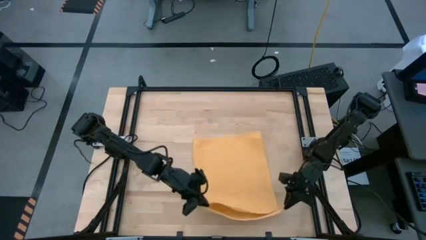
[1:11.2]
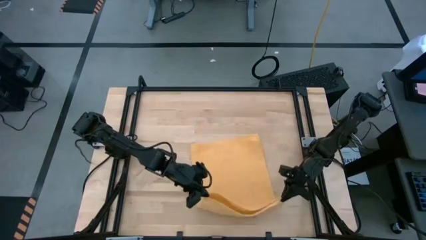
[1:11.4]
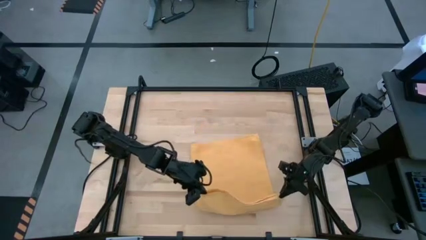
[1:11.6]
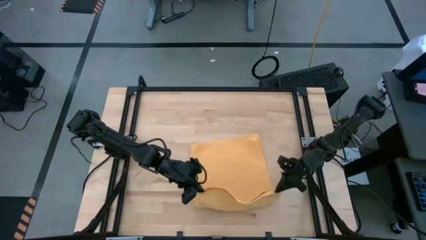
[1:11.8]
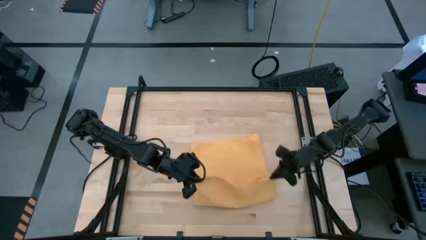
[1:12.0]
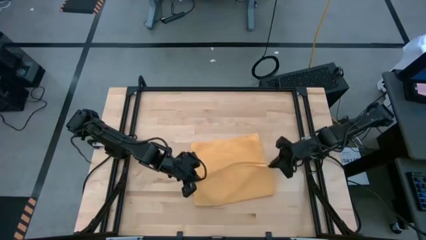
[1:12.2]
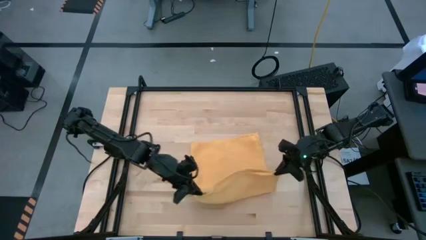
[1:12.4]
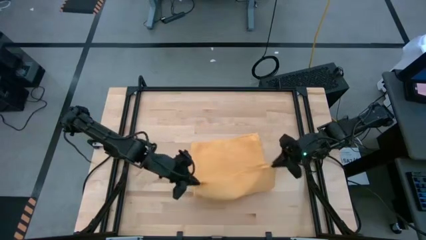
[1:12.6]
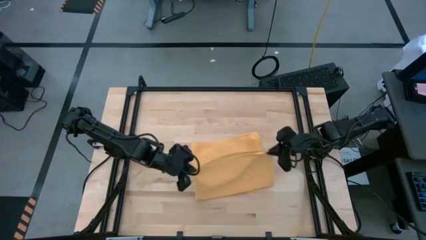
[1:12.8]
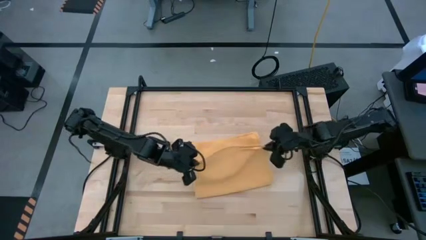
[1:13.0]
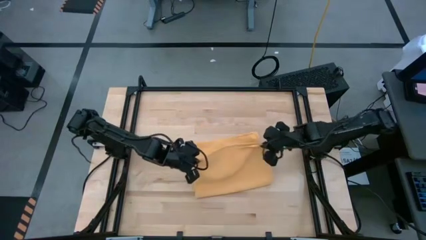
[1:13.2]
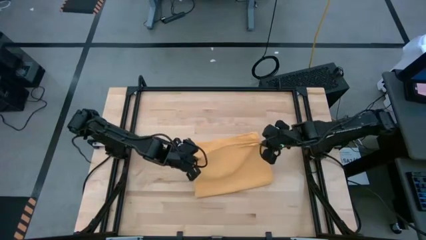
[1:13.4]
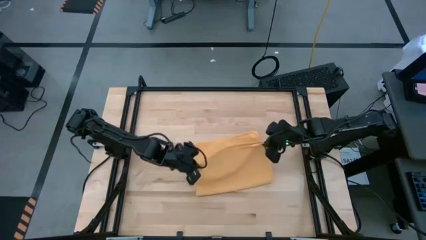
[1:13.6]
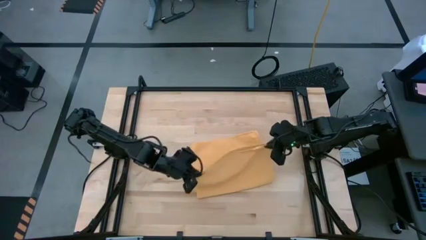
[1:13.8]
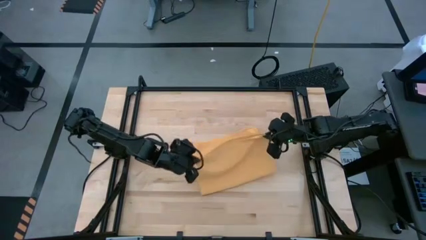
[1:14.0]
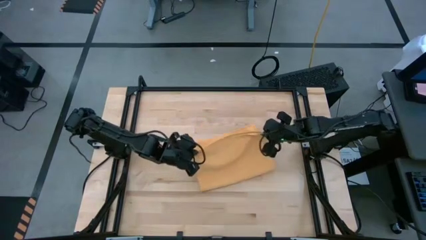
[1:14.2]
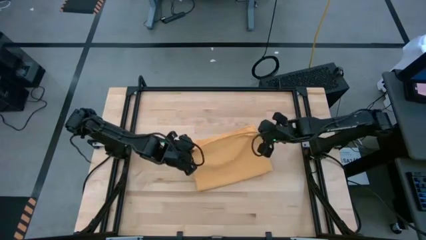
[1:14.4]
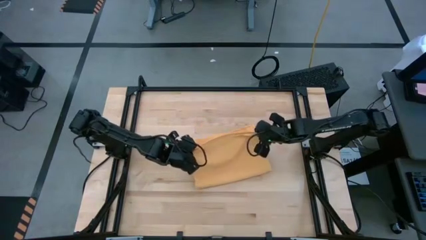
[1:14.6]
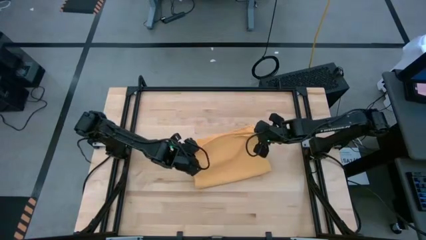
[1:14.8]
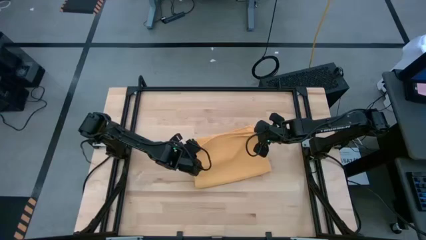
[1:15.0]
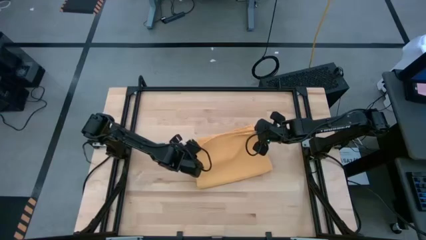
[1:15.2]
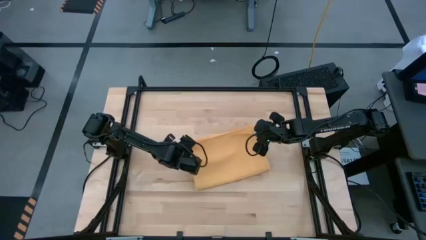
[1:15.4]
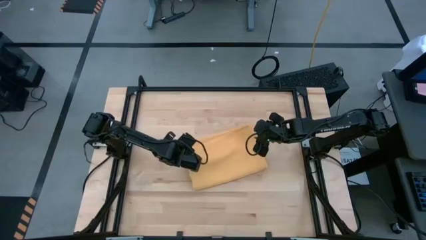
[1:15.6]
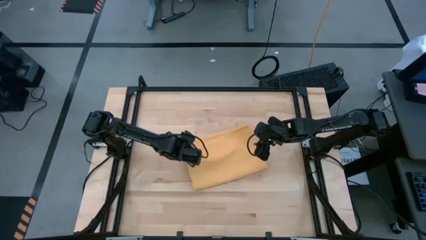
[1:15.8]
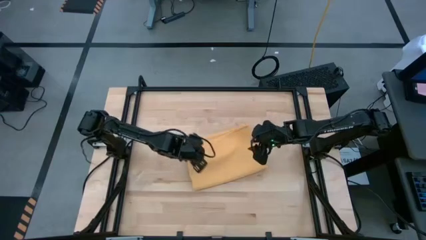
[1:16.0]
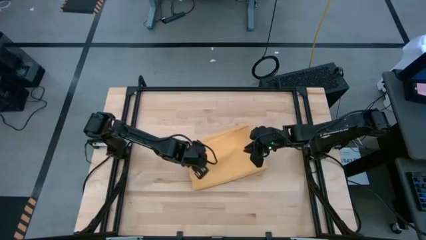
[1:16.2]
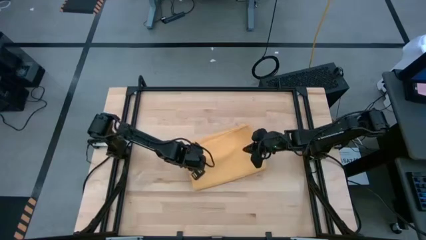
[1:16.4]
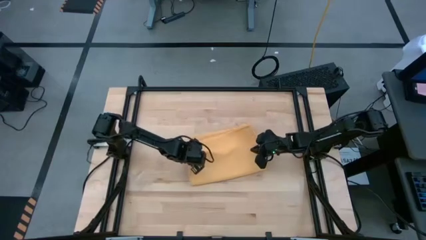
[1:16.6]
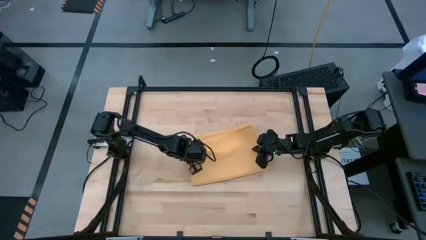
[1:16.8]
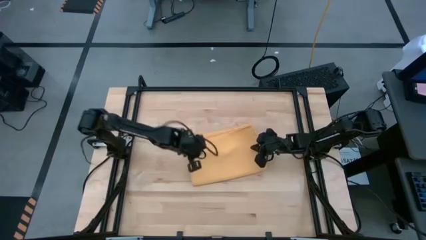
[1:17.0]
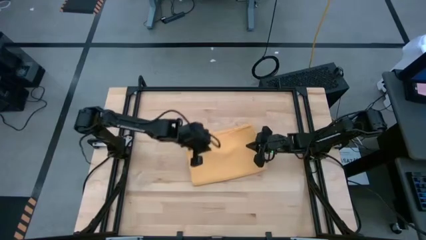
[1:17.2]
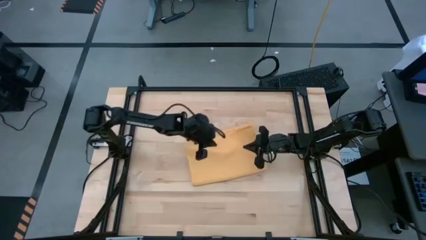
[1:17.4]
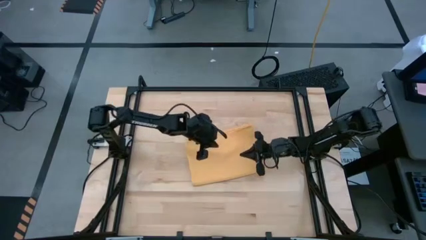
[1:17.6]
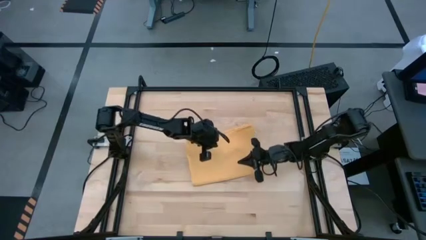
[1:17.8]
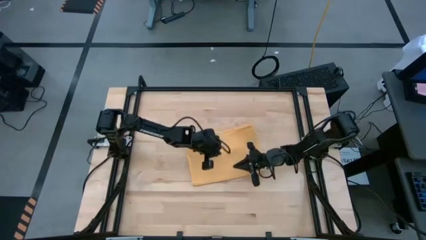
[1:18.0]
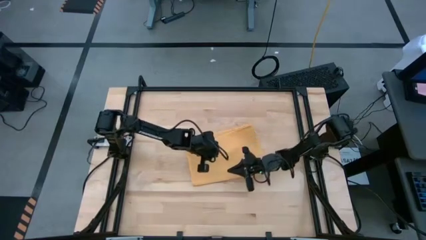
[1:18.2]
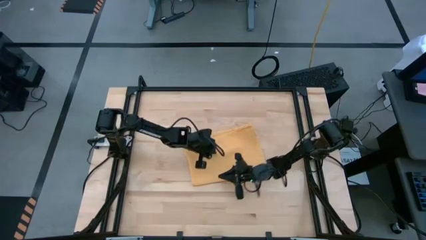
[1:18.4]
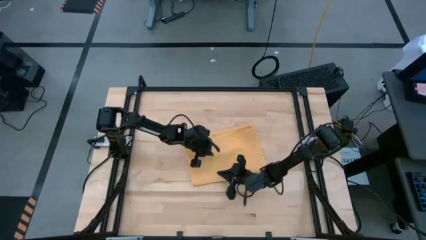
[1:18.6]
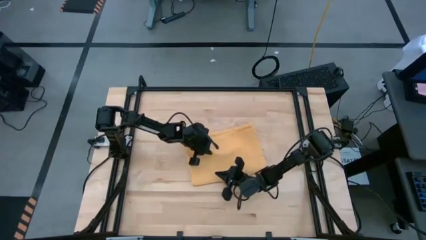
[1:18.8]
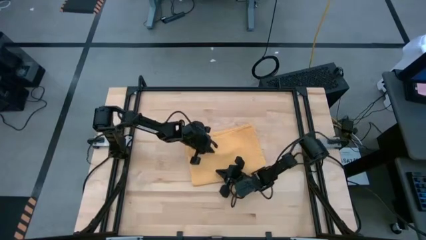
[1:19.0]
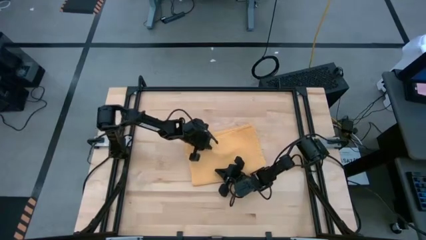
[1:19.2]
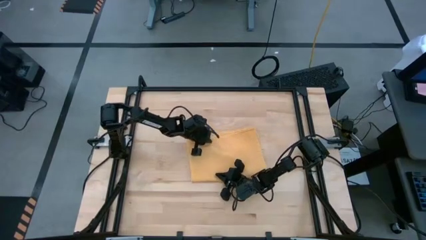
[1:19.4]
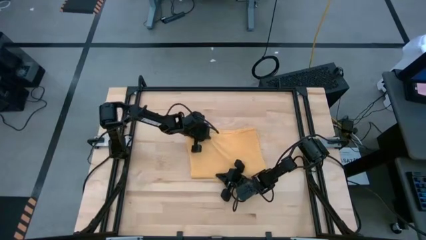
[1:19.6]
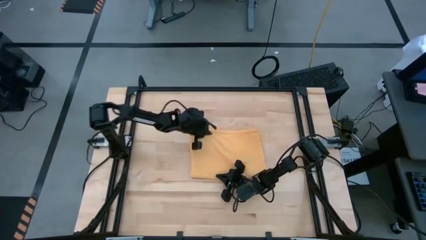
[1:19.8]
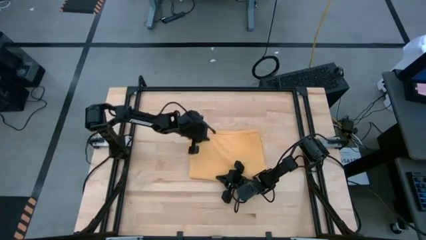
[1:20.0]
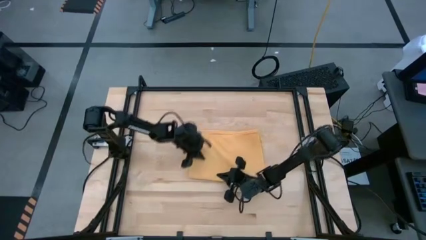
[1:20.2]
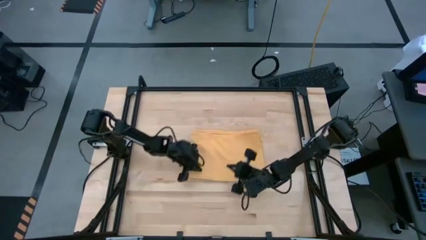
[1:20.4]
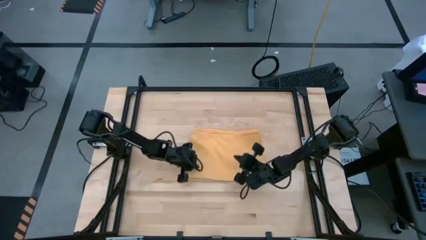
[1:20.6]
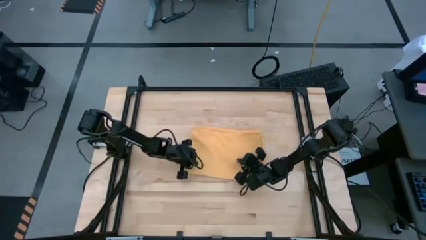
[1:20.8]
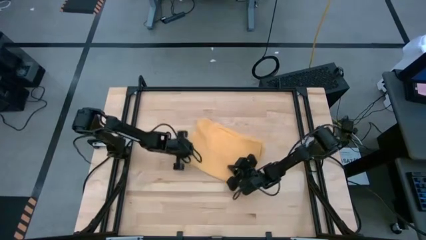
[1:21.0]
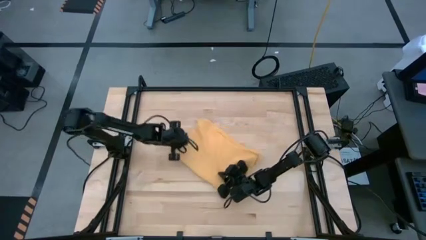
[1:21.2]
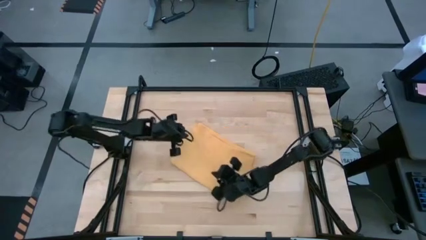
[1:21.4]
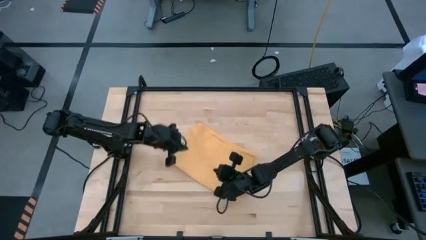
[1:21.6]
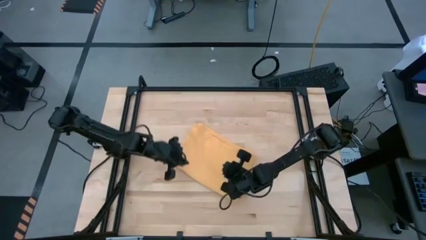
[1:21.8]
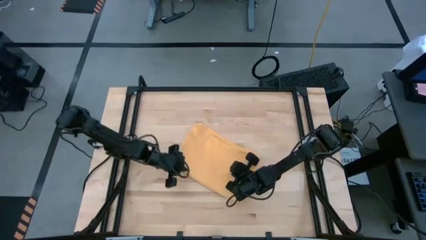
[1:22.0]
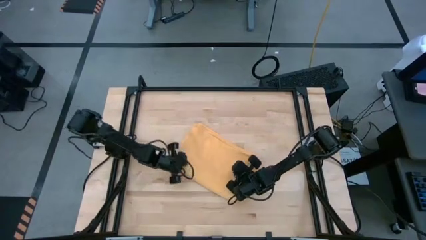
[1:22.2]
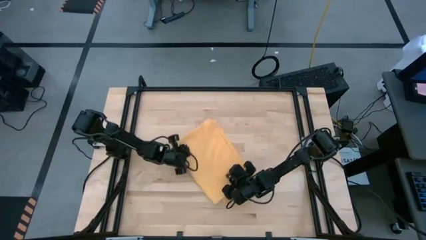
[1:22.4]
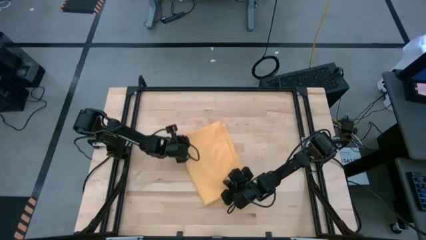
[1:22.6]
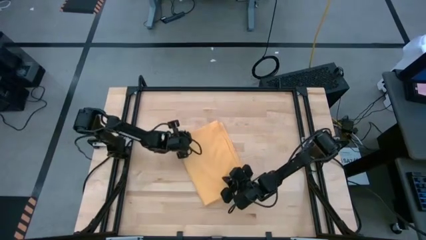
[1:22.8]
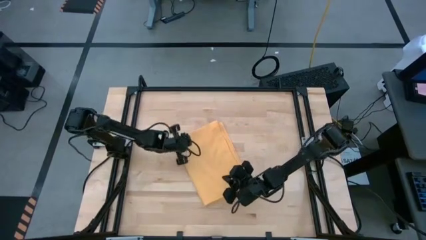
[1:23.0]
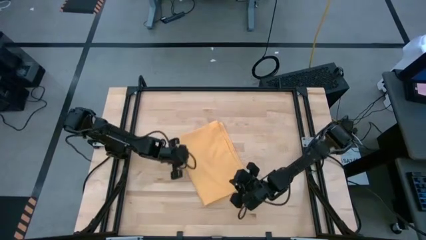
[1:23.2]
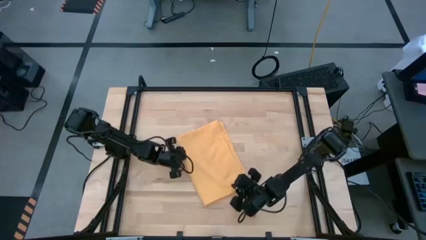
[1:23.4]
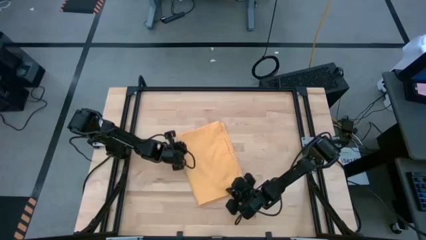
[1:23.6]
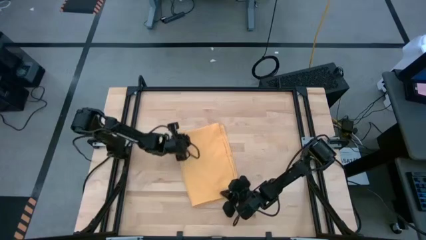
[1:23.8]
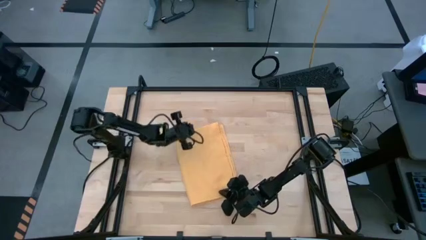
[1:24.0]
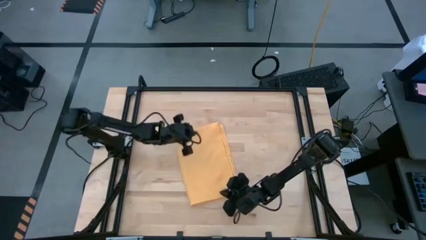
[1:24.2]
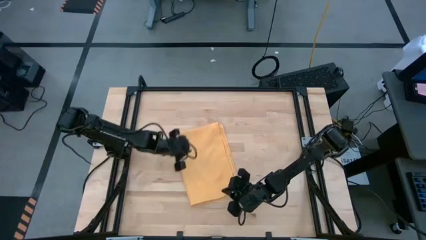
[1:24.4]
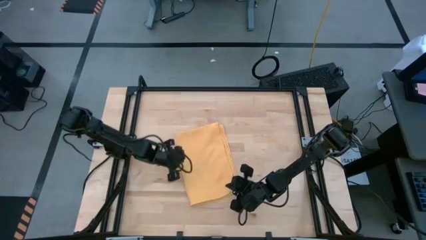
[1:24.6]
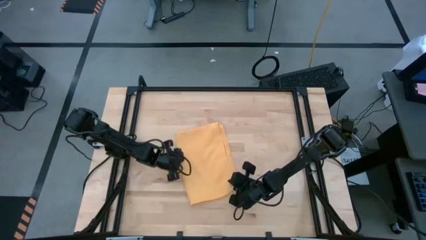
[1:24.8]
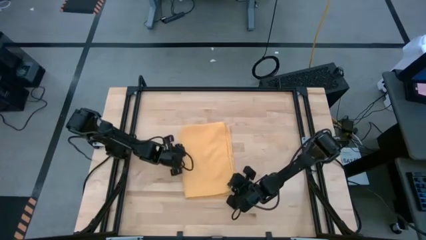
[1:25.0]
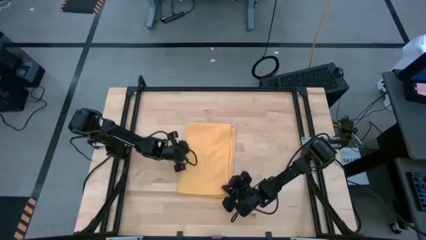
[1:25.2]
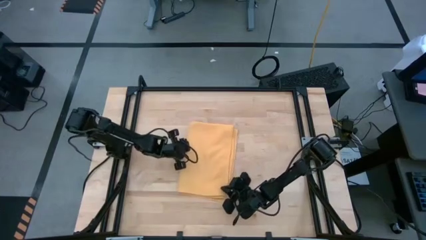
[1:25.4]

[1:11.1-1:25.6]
Task: Roll towel
Fold the yellow towel
